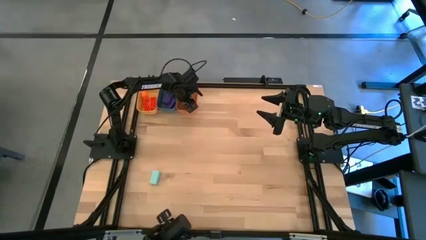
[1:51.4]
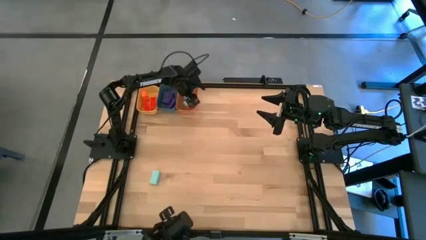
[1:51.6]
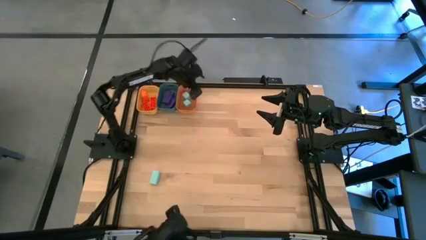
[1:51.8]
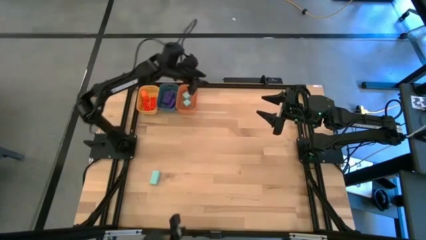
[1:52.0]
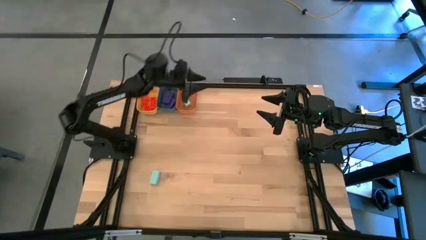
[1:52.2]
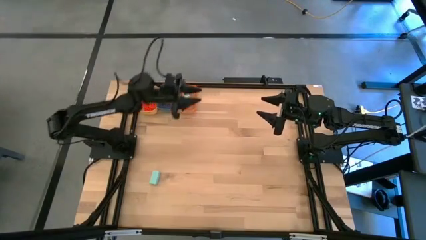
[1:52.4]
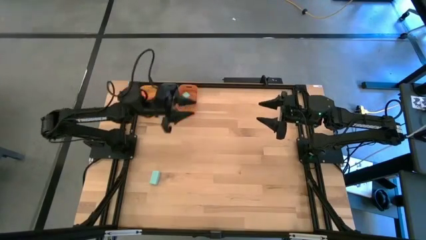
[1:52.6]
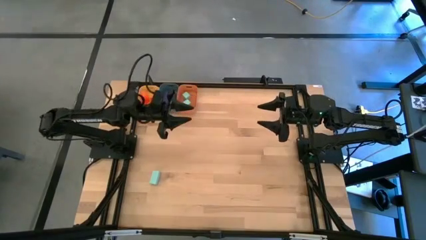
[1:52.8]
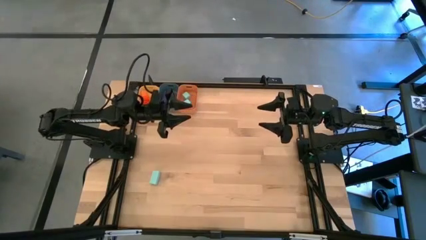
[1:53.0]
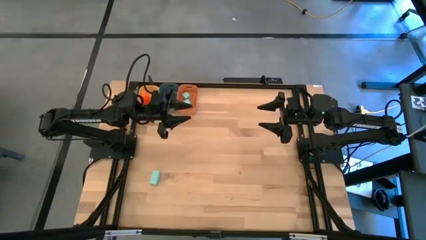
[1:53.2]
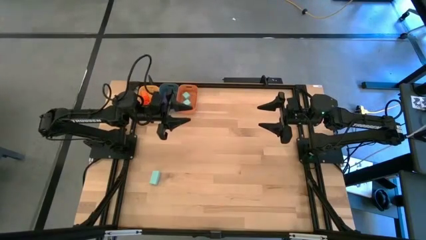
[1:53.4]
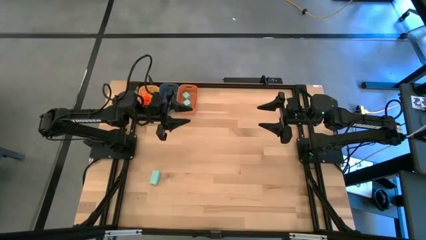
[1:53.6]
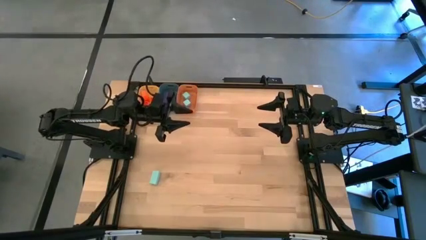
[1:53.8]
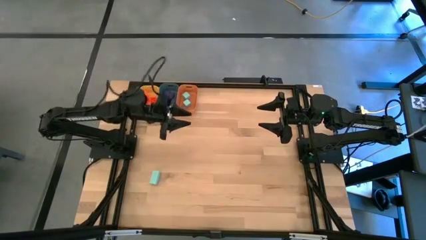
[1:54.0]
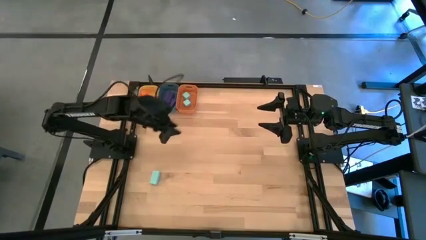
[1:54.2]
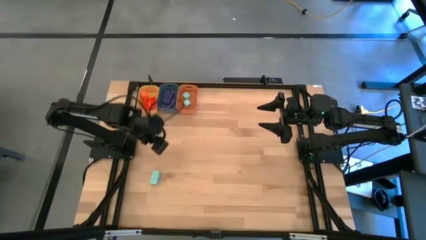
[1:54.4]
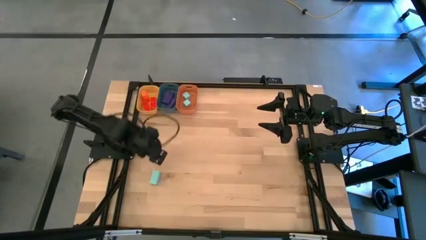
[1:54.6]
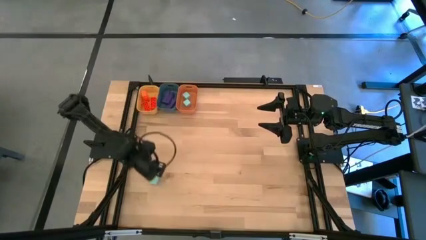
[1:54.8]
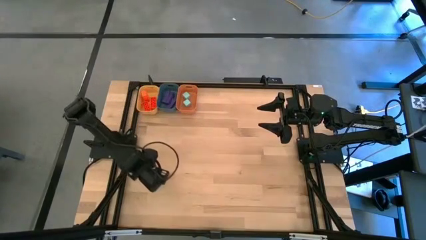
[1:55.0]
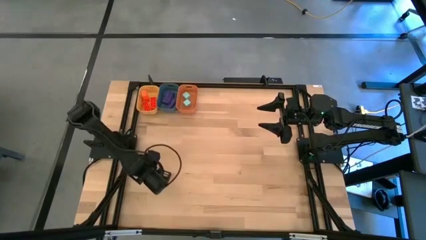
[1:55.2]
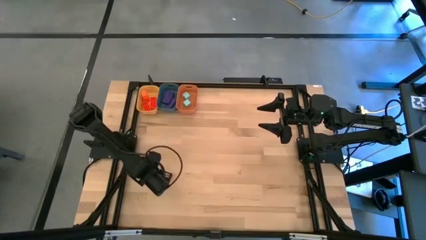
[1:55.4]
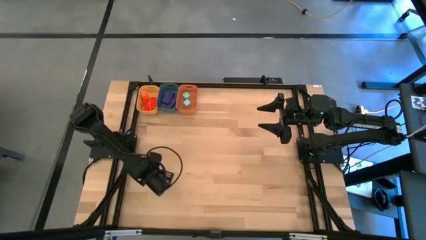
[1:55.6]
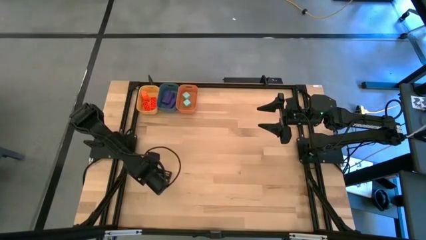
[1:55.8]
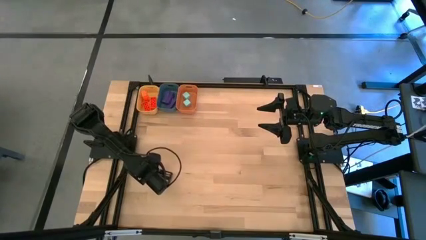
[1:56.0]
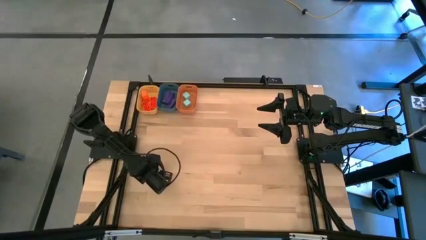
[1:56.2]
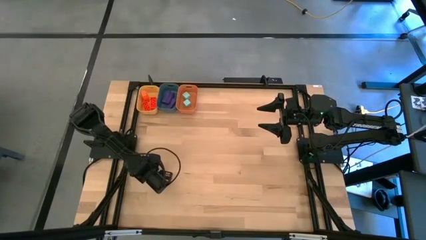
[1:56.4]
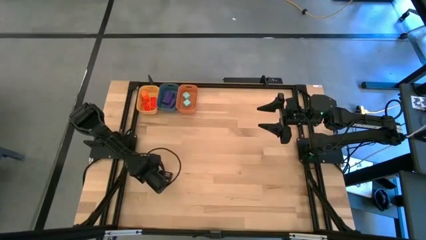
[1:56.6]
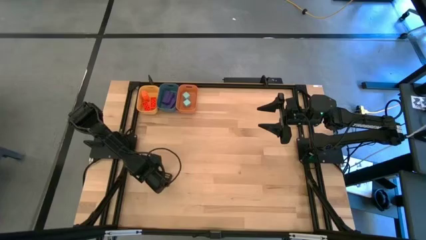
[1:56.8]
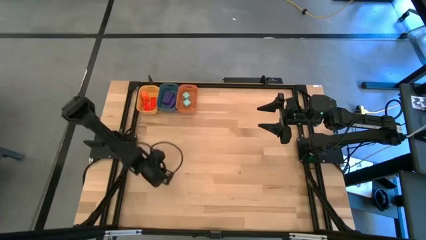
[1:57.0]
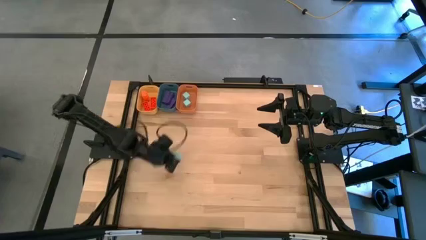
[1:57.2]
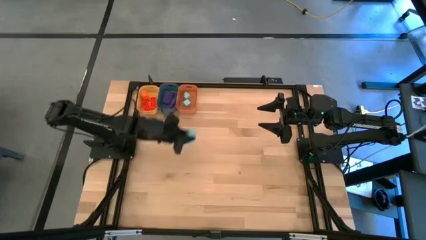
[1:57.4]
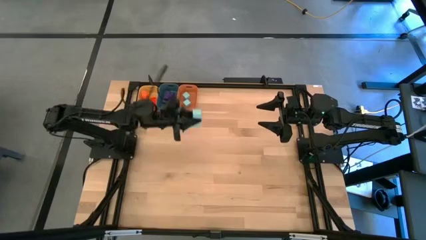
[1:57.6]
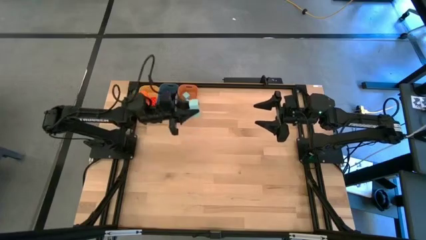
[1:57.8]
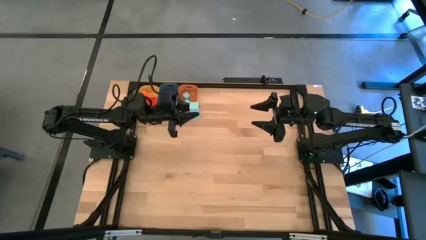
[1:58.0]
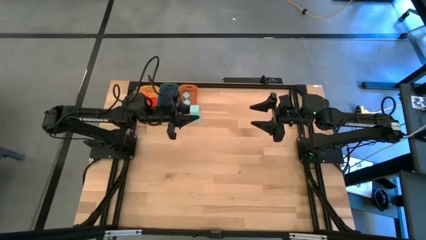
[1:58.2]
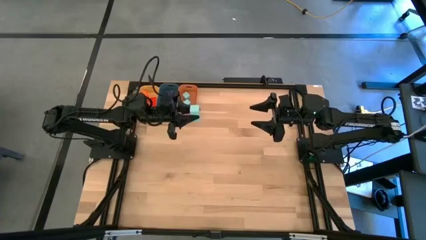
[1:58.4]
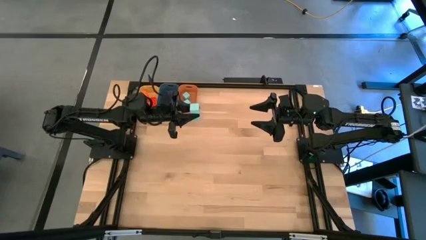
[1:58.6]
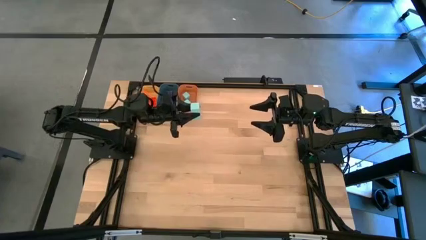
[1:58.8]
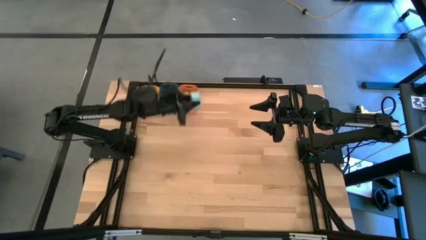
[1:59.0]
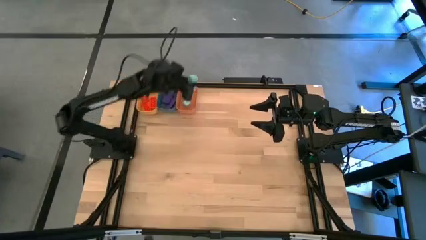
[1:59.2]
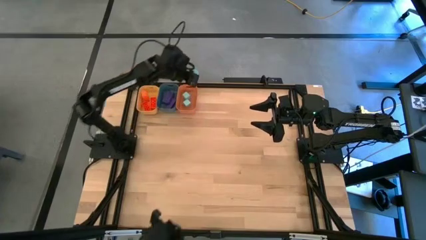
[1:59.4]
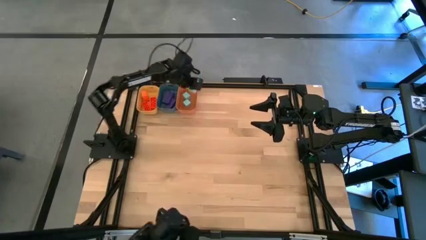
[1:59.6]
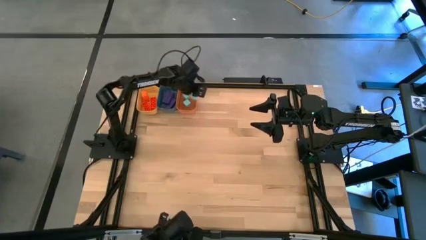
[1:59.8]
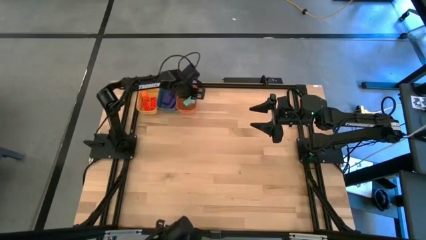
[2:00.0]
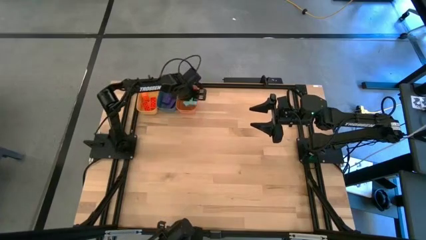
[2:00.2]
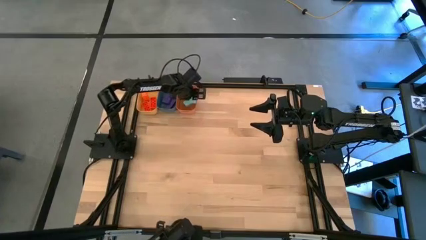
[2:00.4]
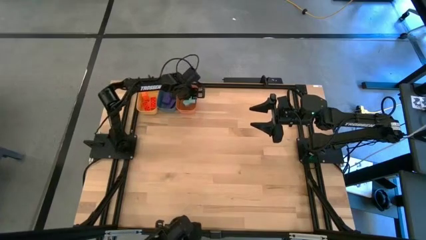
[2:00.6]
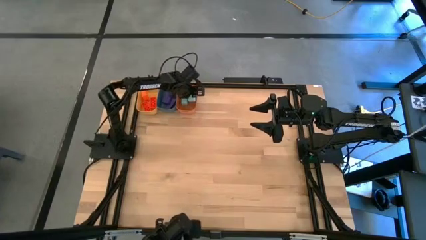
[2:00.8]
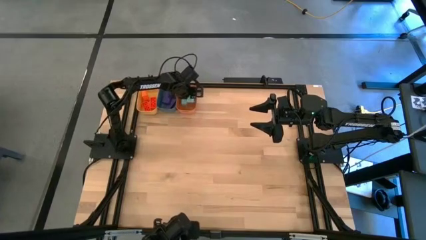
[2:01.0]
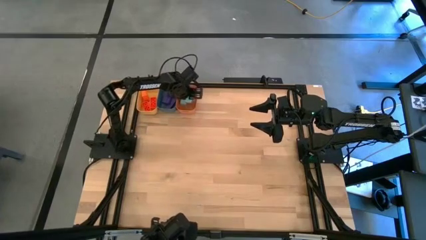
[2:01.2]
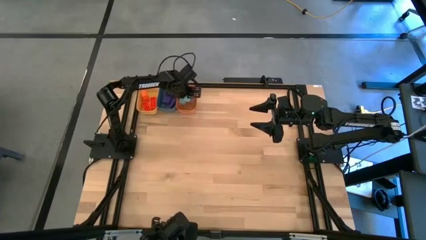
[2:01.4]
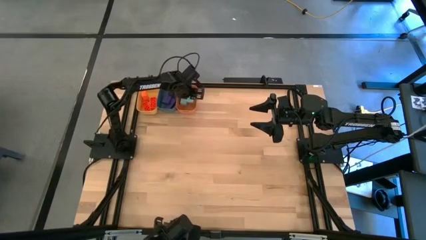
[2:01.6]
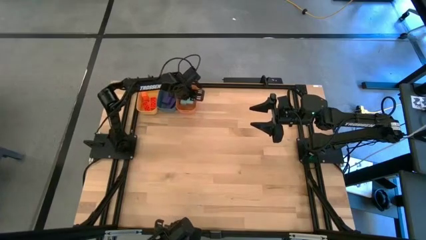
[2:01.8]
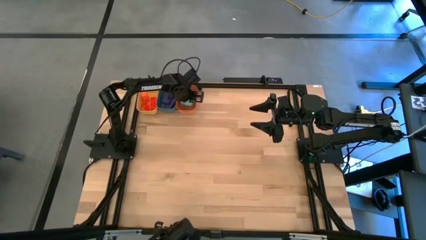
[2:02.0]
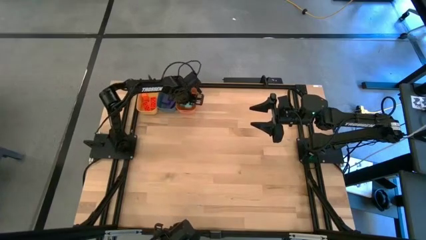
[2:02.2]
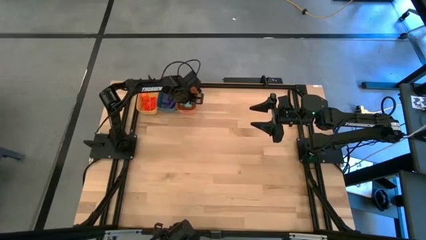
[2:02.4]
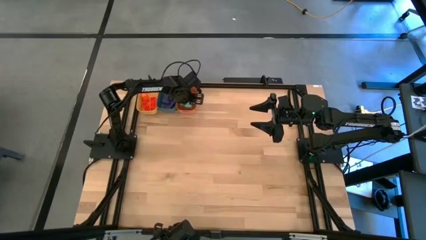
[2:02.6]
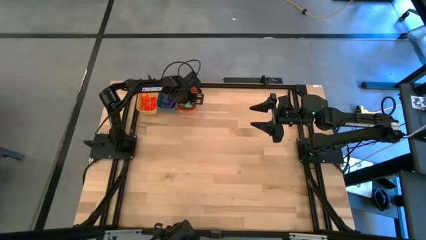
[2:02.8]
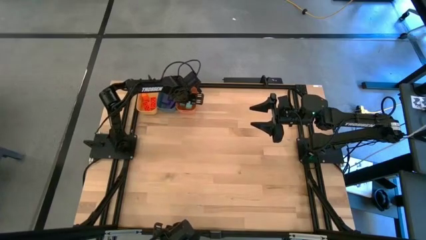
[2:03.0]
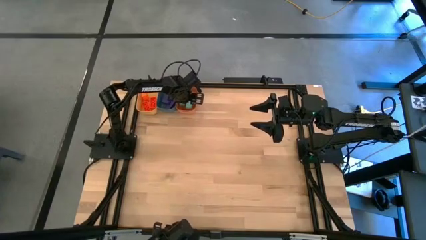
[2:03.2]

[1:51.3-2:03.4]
Task: Sort & place blocks by color
Put the blue block into the orange bin

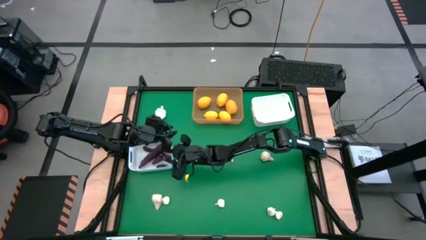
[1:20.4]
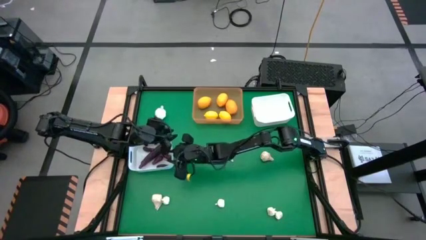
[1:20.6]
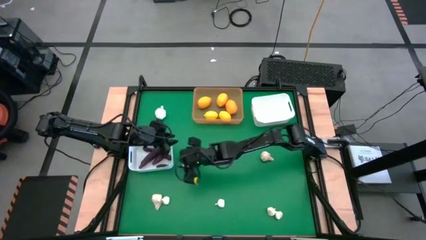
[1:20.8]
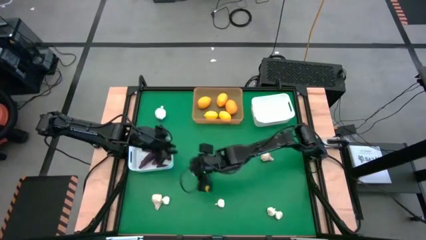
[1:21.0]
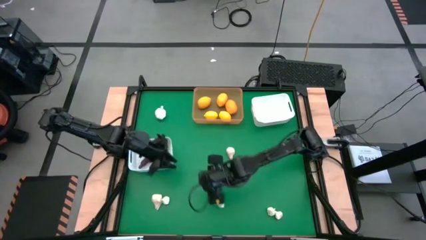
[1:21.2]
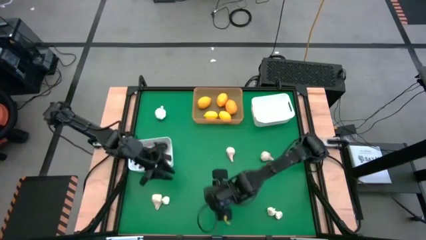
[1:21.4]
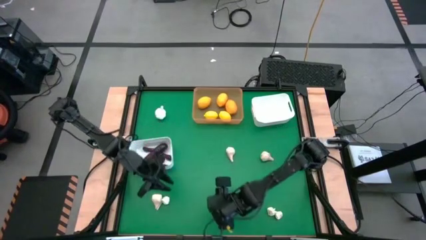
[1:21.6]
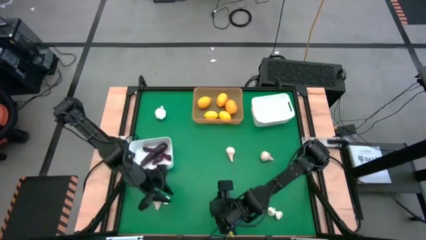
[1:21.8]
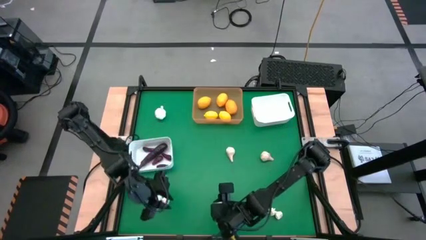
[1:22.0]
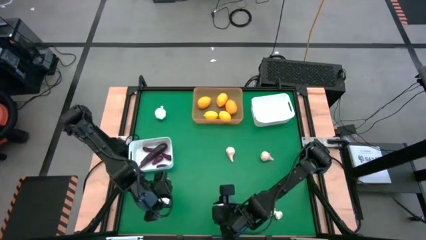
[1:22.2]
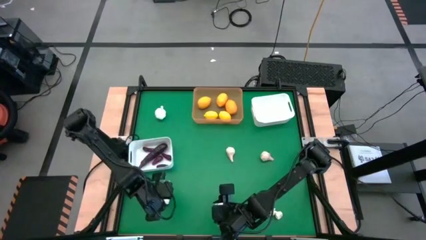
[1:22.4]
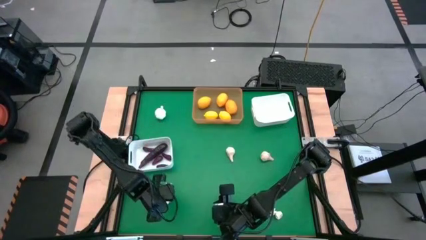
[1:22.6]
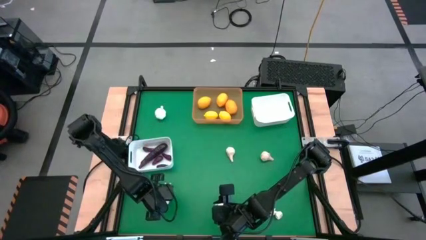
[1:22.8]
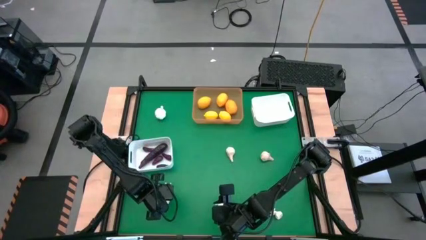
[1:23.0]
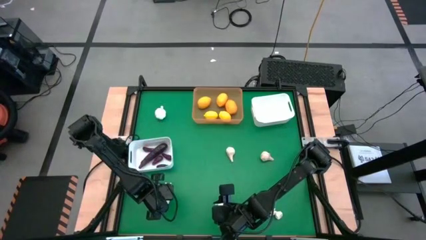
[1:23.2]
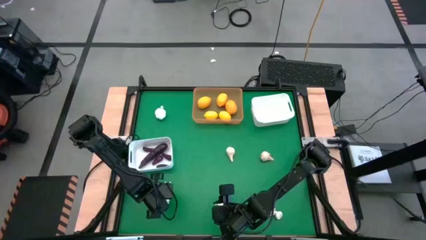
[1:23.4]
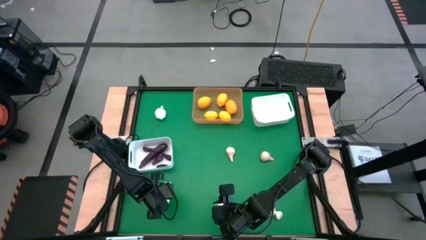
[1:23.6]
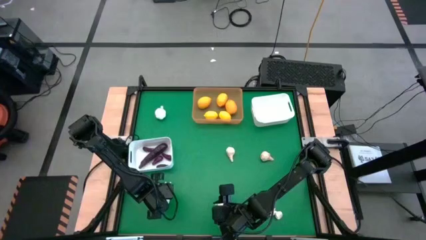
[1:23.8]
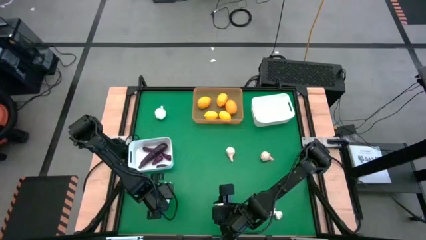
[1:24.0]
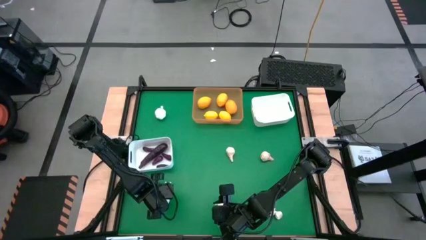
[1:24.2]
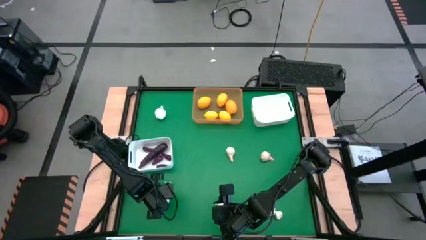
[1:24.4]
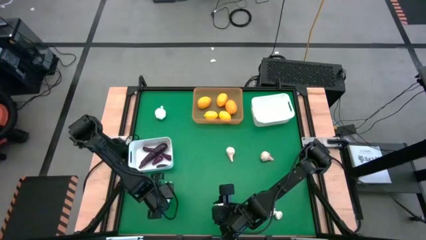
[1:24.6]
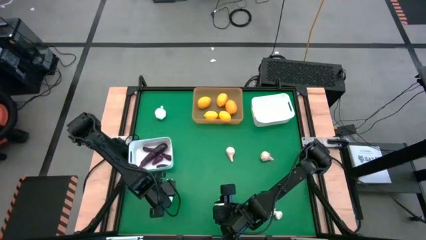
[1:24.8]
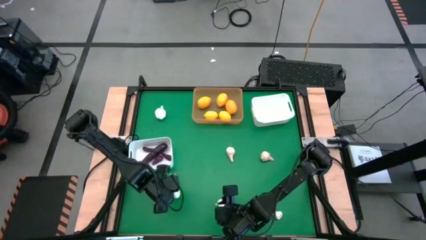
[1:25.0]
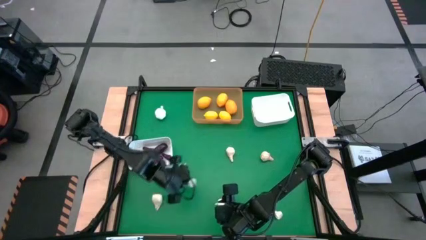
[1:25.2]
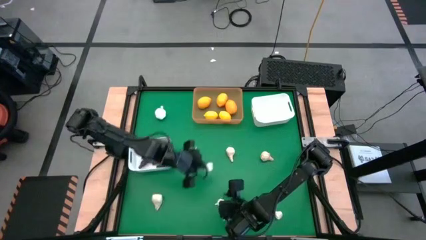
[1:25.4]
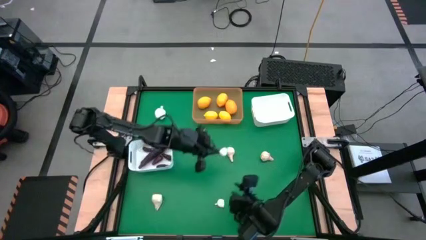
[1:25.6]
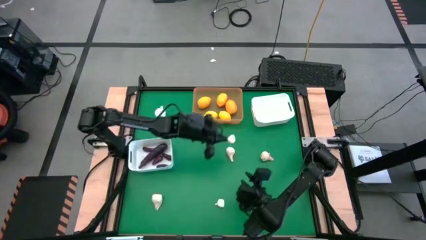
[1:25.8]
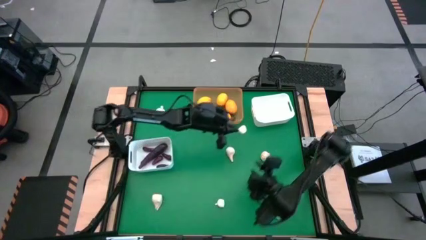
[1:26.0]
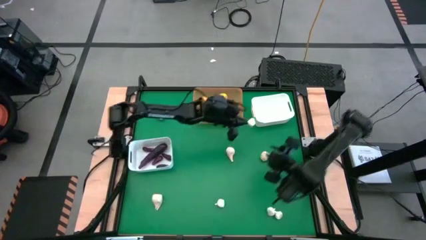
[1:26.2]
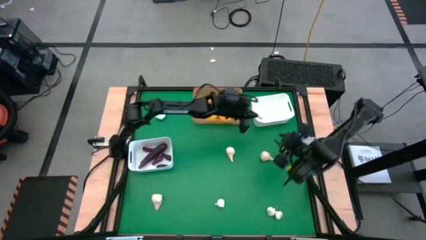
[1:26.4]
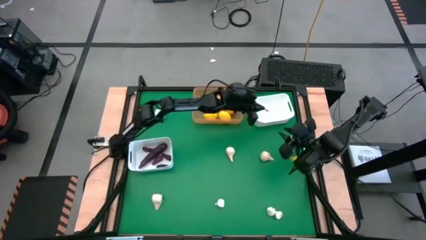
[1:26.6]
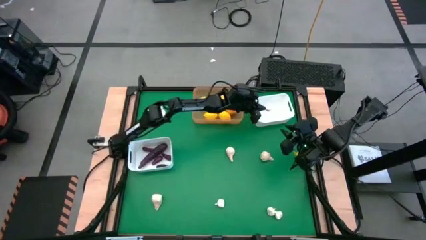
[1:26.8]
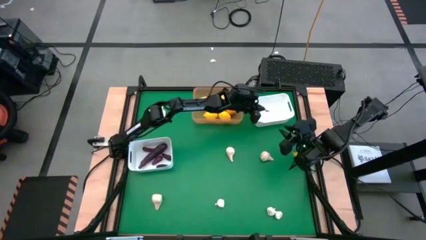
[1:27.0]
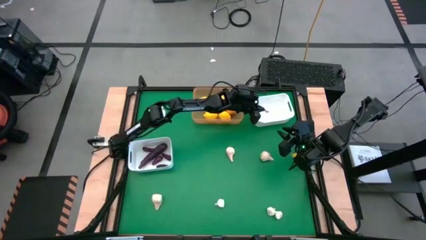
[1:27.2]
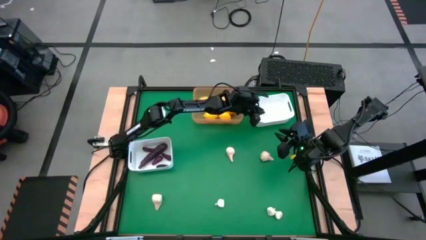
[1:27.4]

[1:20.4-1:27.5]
Task: Sort produce into baskets
Put the garlic into the right white bin
